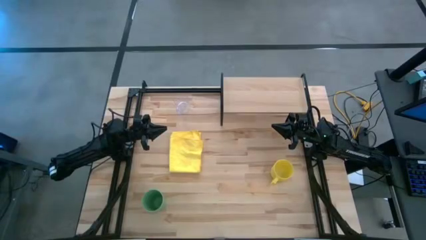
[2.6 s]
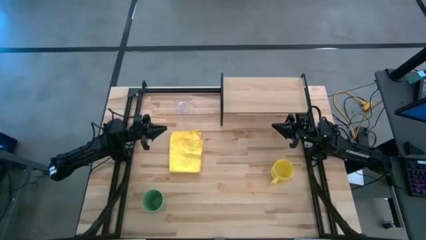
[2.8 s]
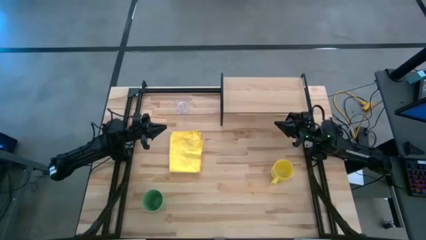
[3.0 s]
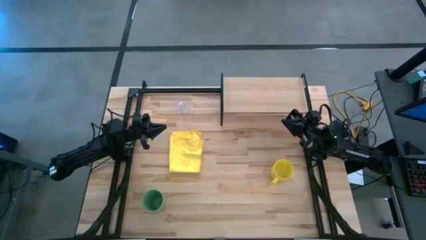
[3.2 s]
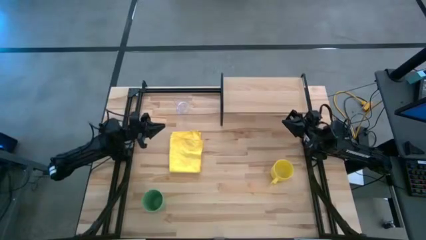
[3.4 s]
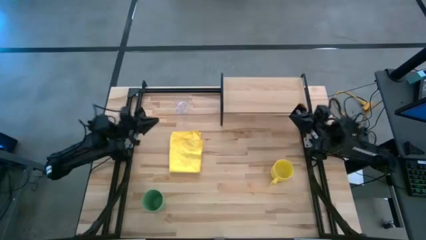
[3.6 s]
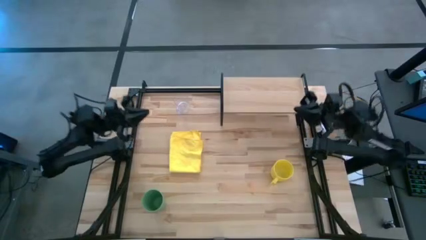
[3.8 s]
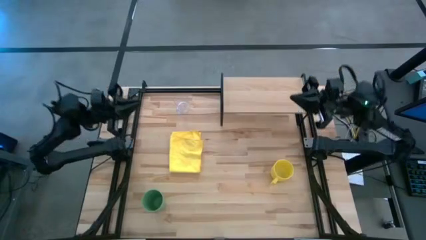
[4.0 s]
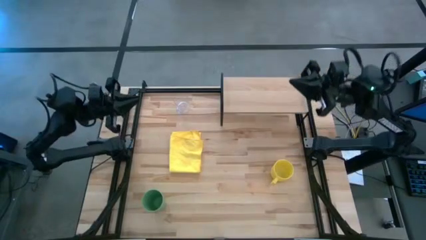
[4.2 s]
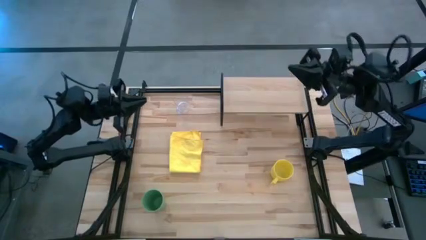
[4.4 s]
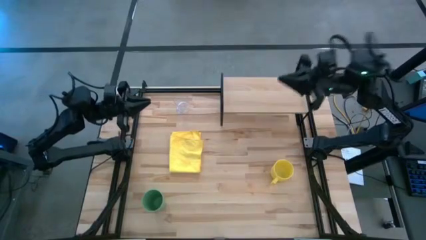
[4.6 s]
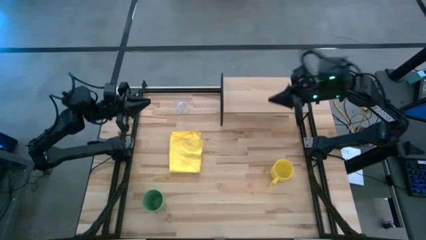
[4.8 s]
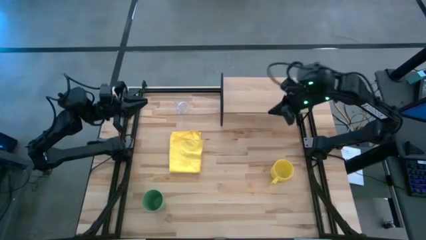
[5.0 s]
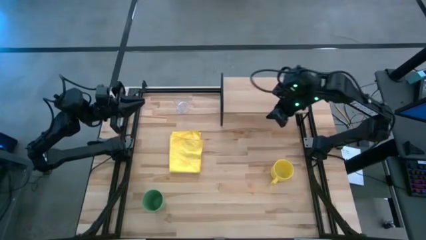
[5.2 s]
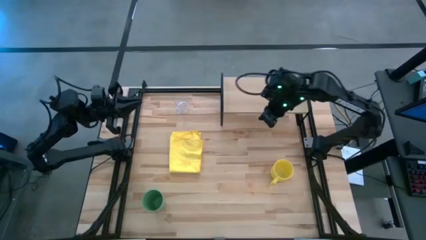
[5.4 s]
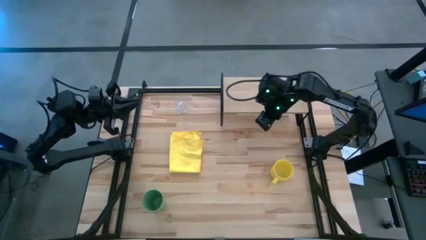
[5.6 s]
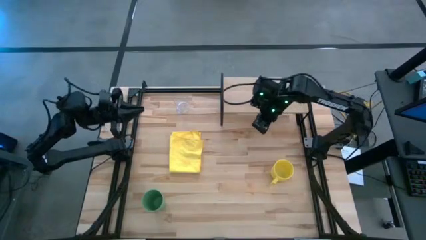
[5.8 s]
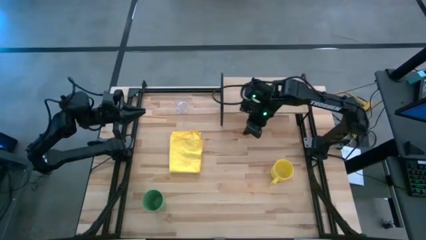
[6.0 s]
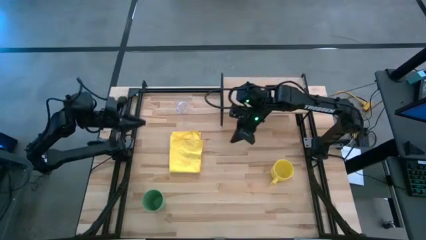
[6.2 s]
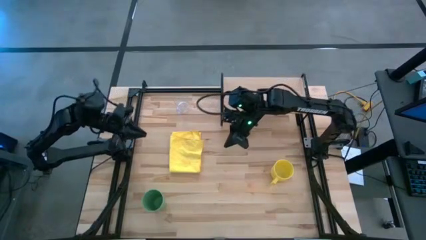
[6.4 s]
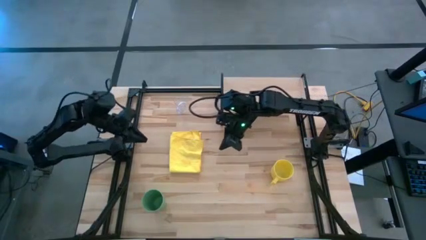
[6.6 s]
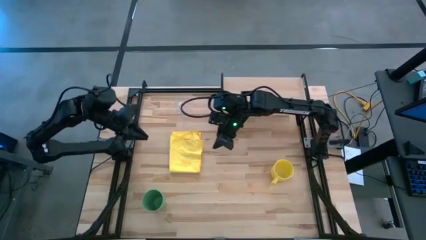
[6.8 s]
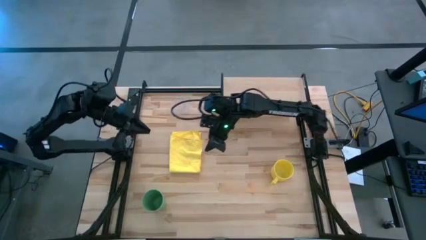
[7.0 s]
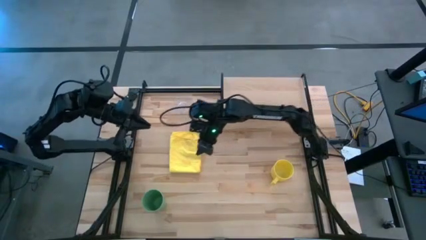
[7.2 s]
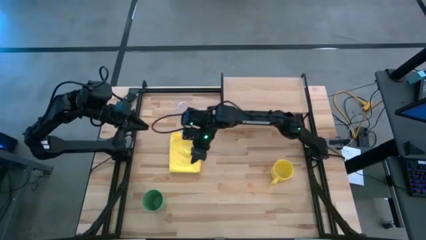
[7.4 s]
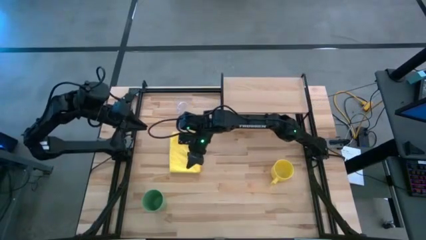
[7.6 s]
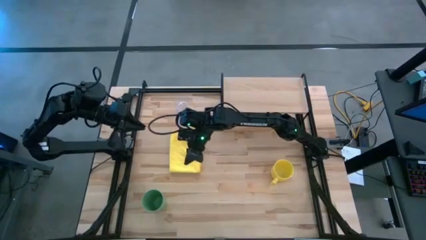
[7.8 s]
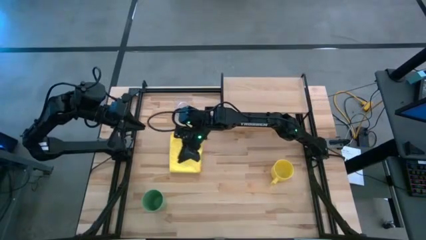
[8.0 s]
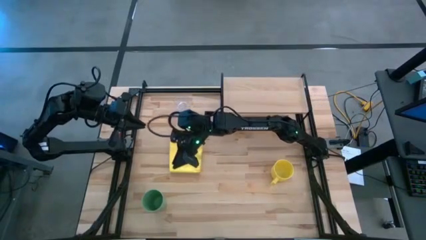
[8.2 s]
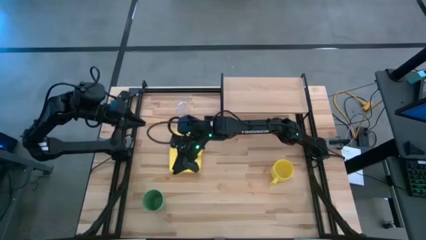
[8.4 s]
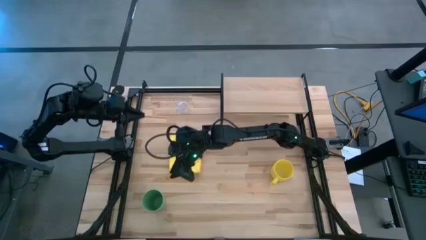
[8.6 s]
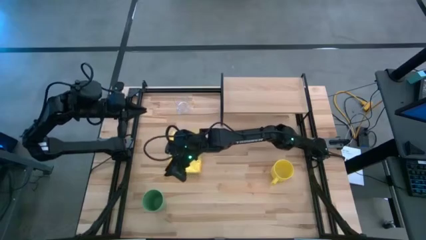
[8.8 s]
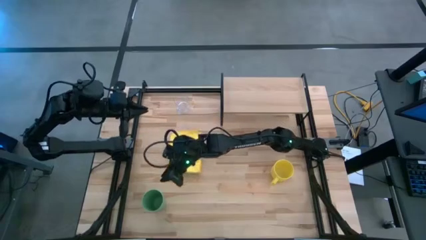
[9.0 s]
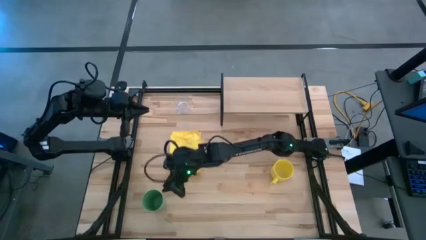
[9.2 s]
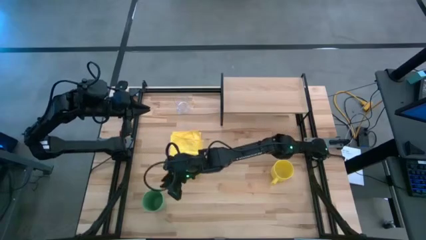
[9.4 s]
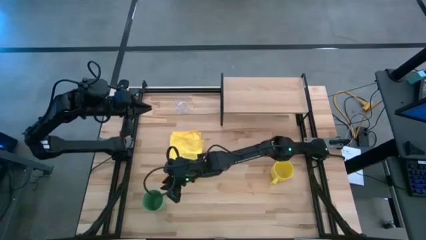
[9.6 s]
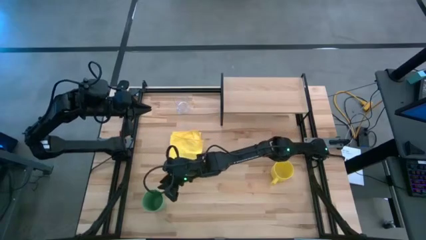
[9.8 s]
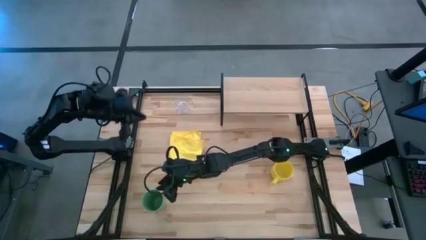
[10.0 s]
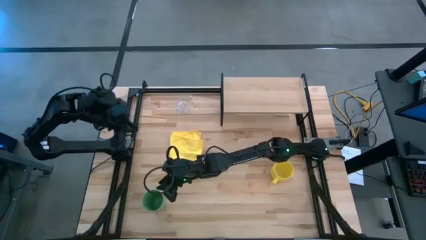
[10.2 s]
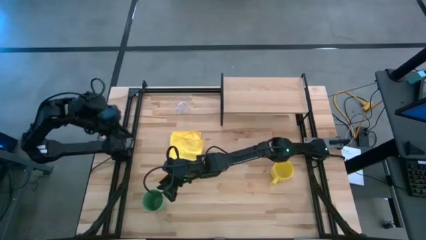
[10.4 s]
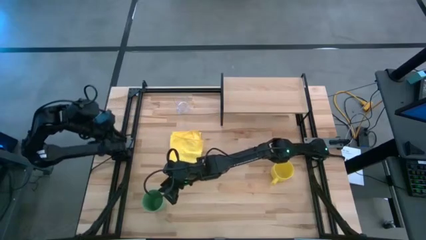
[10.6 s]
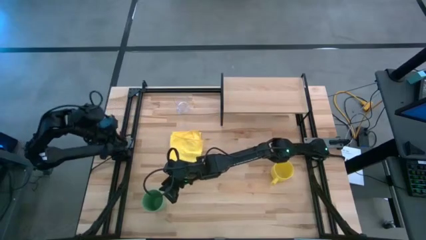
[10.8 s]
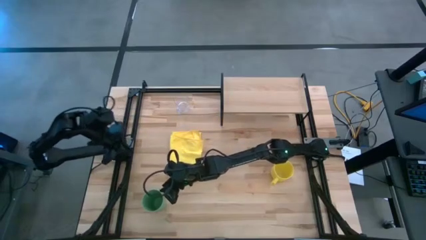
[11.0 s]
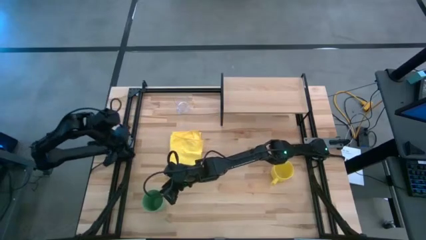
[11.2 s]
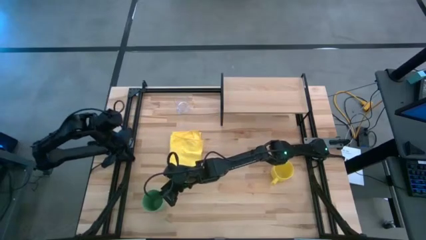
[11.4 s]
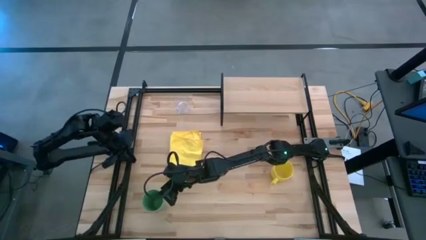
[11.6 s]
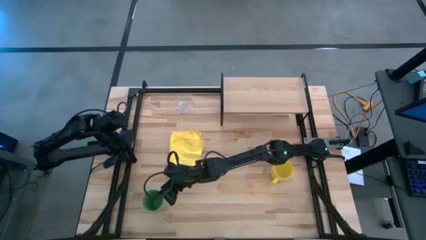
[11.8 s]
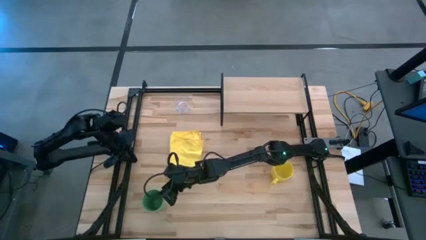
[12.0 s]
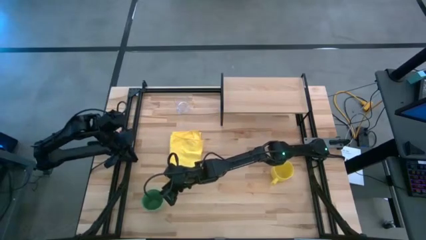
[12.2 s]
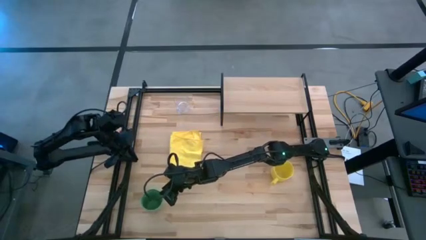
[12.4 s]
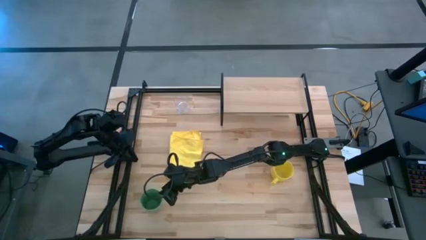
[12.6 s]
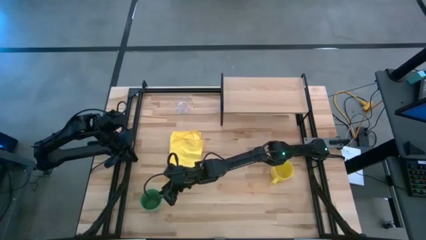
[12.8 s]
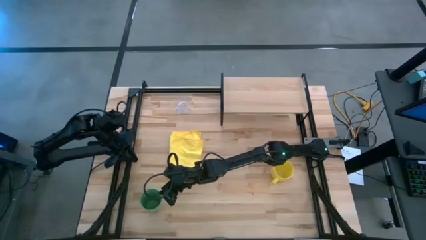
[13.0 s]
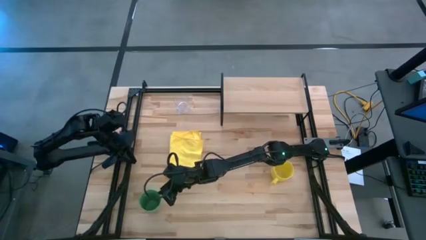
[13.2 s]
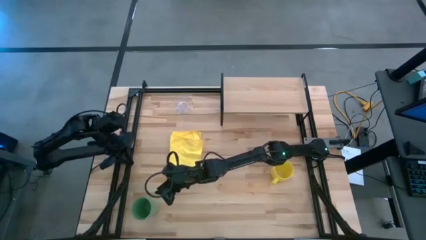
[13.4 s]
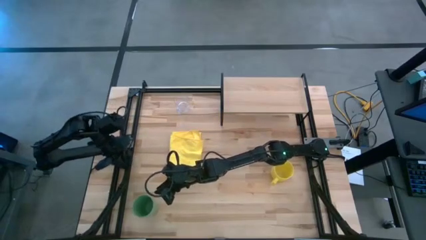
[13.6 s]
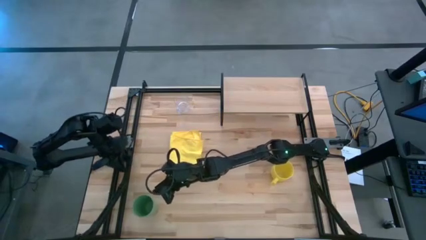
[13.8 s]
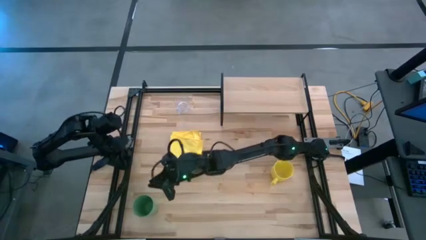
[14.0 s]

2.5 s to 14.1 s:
Task: Stack small to large cups/mugs on shelf
Put the green cup on the shelf

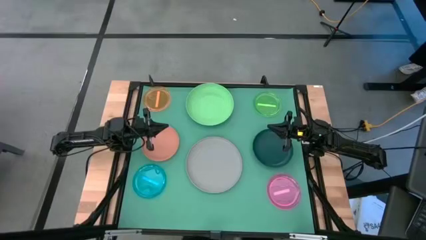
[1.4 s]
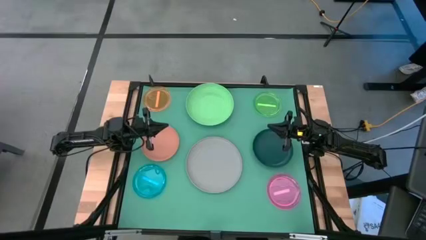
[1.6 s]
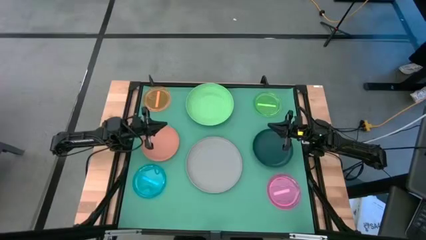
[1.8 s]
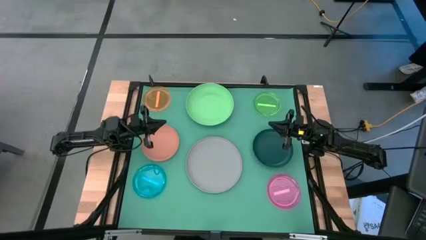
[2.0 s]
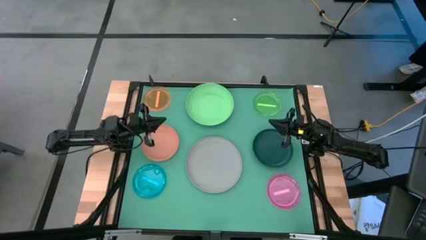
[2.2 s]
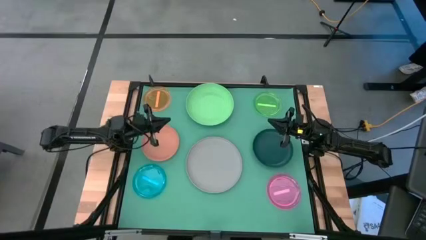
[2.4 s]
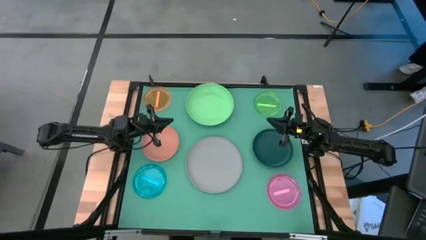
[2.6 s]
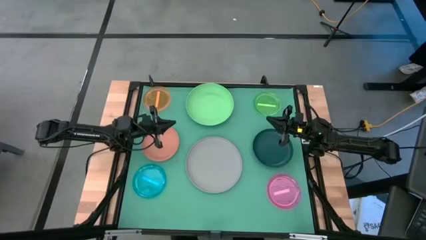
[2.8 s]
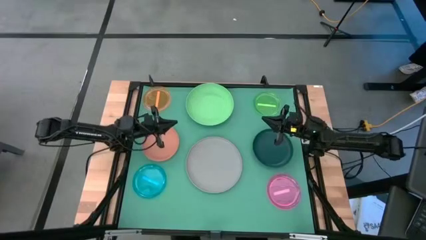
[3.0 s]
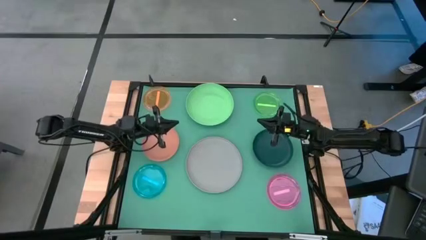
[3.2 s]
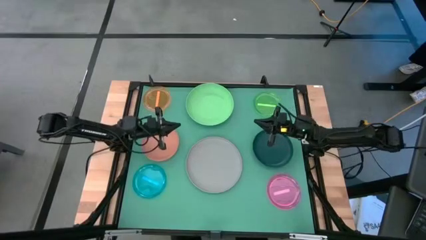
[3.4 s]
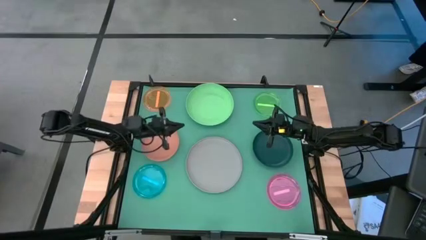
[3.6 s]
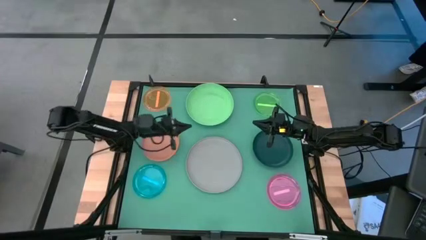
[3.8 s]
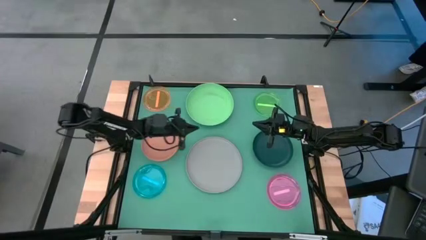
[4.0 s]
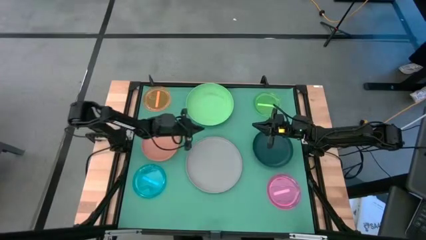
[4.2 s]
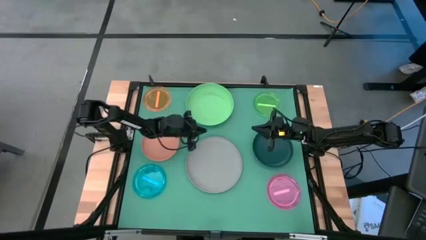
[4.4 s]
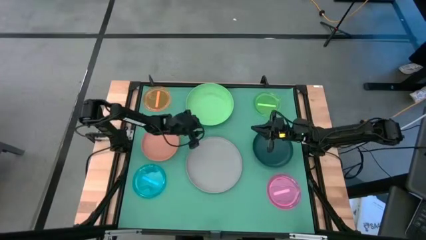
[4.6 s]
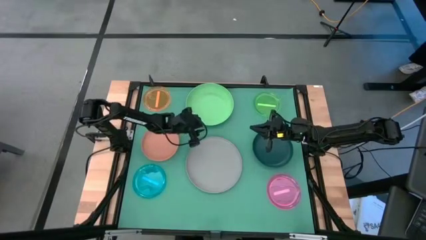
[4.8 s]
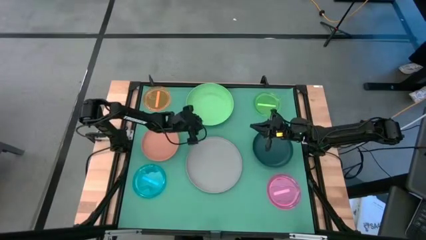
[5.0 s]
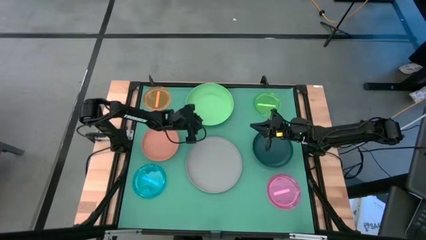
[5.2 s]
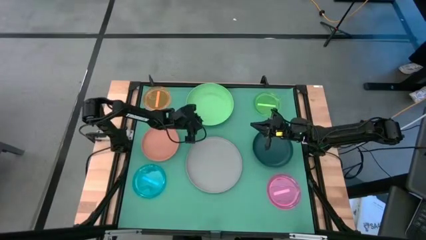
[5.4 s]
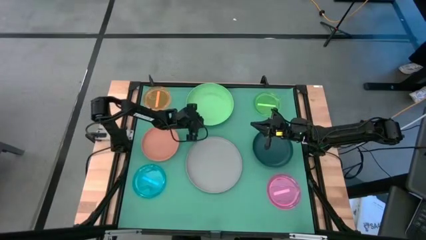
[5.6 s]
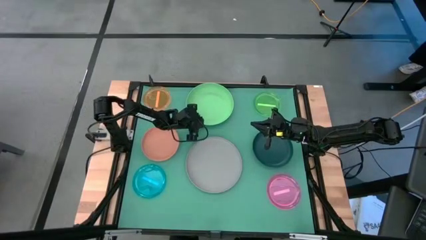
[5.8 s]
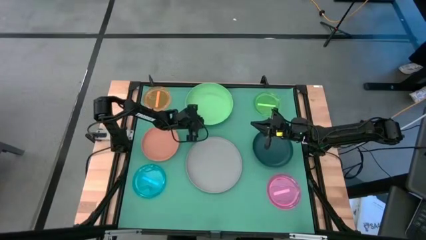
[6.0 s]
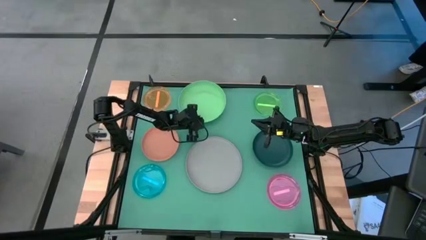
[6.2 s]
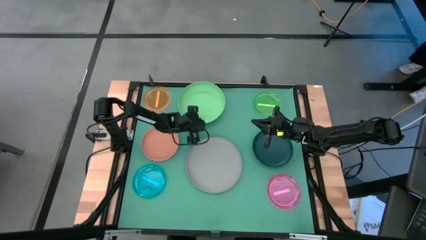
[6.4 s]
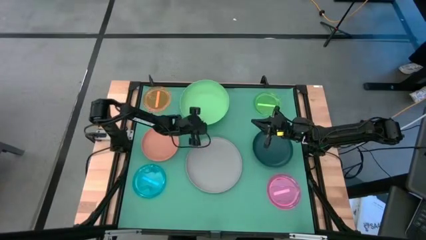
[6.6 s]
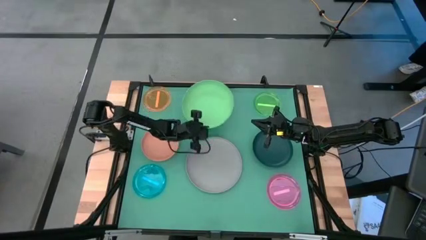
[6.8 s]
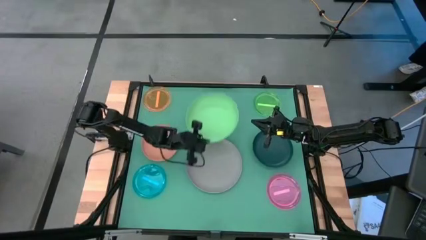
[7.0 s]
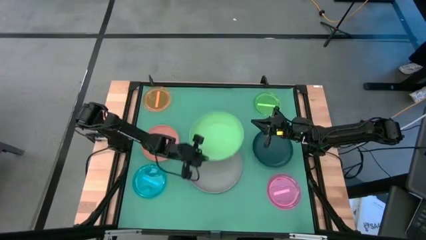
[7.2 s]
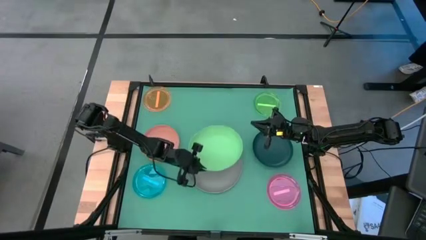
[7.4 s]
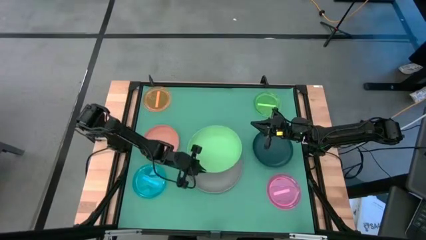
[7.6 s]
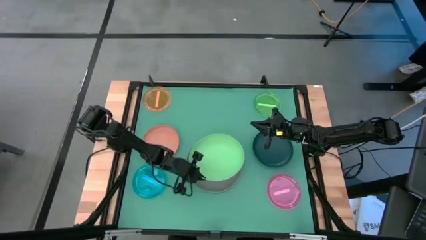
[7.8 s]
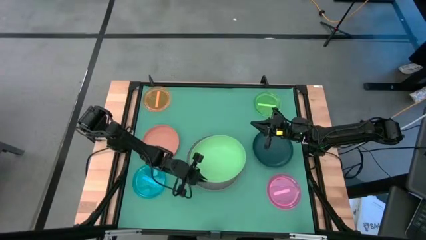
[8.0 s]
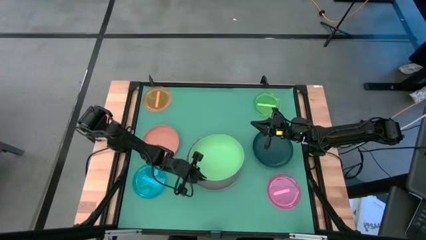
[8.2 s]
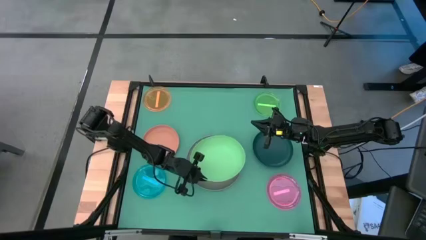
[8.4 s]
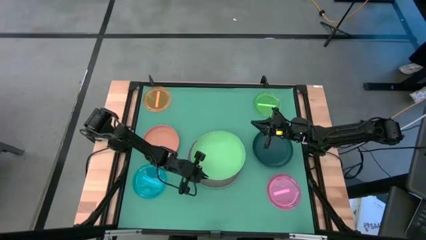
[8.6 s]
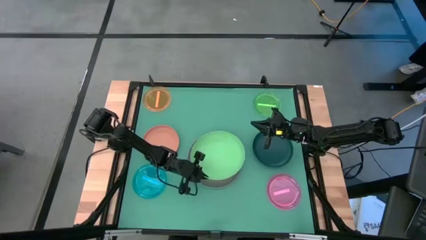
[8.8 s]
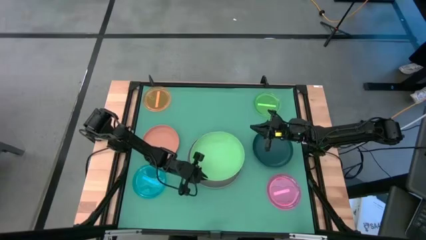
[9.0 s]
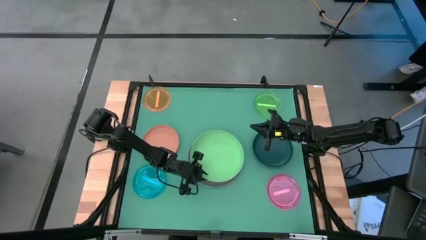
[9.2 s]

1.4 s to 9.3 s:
Task: Stack plastic plates
Stack the green plate on the gray plate
